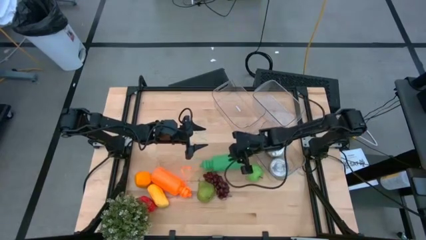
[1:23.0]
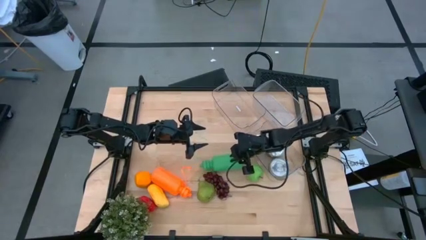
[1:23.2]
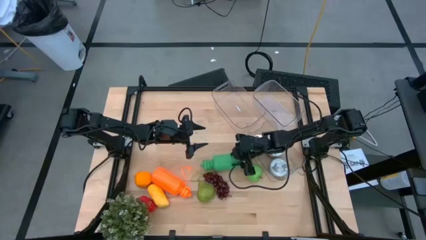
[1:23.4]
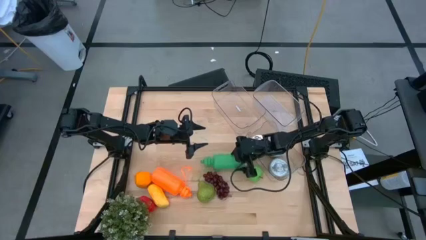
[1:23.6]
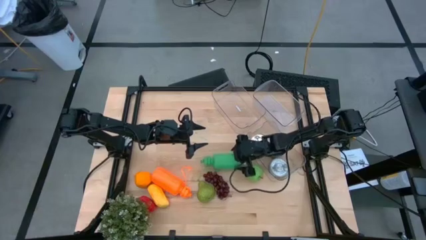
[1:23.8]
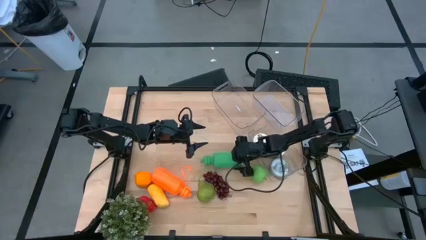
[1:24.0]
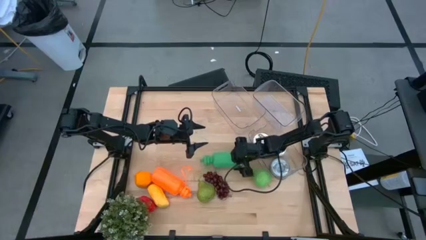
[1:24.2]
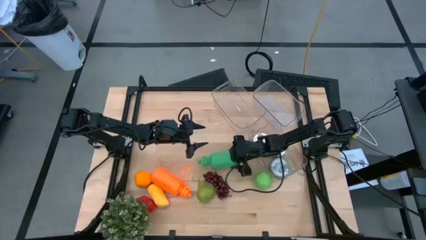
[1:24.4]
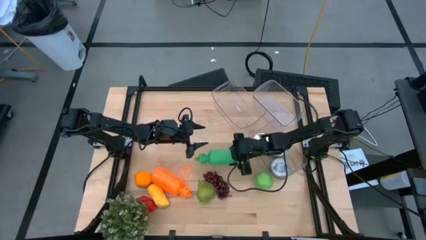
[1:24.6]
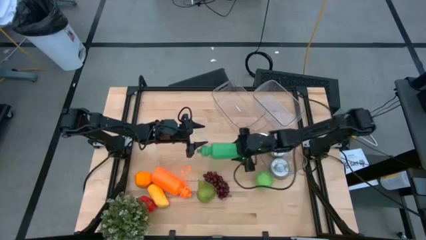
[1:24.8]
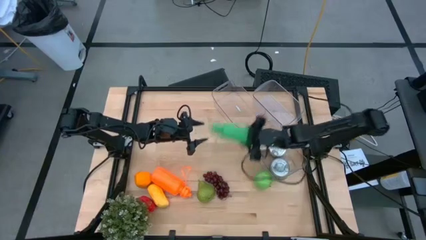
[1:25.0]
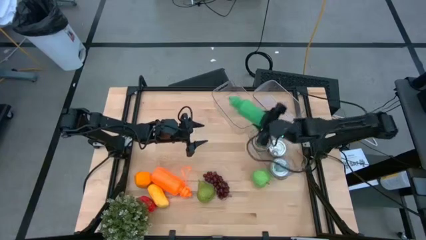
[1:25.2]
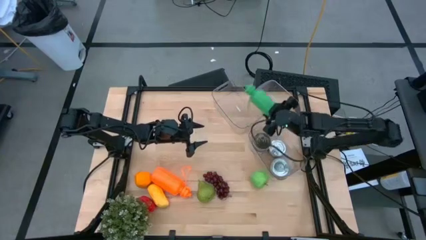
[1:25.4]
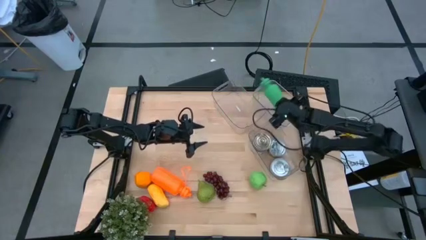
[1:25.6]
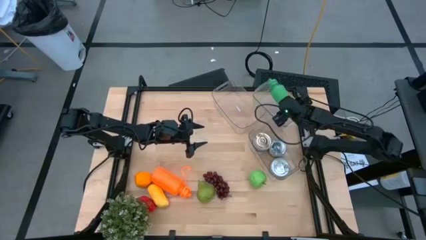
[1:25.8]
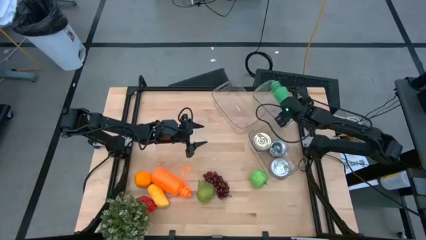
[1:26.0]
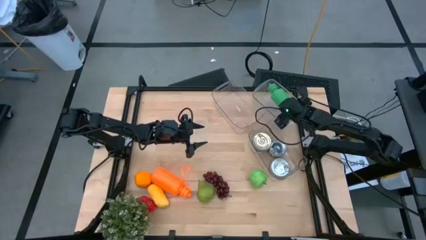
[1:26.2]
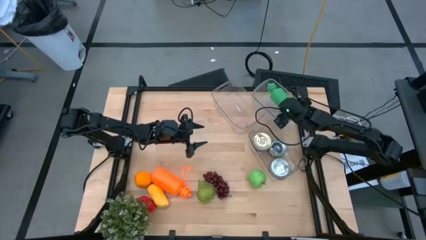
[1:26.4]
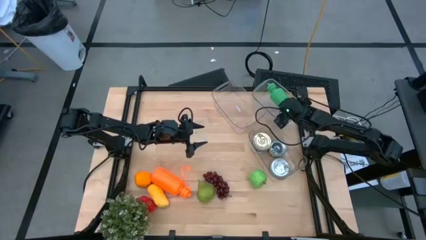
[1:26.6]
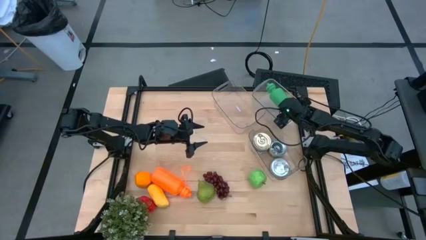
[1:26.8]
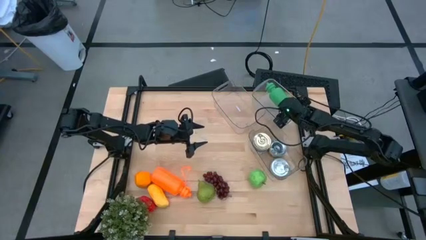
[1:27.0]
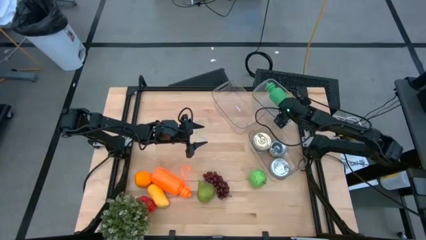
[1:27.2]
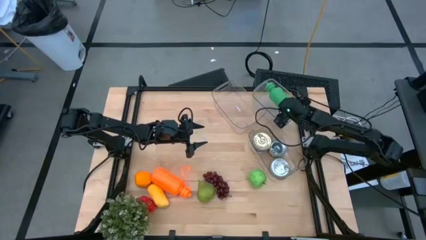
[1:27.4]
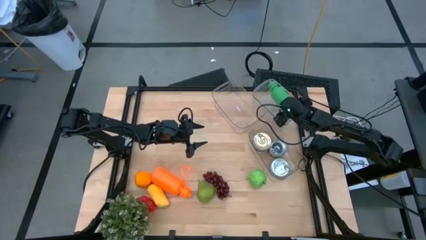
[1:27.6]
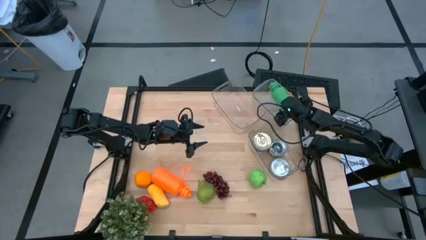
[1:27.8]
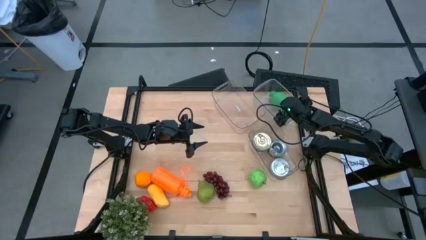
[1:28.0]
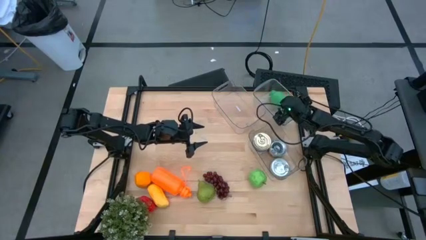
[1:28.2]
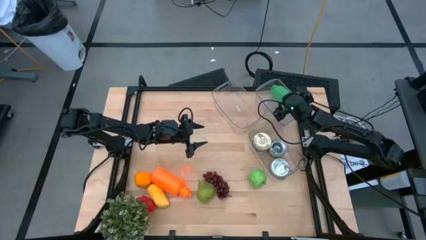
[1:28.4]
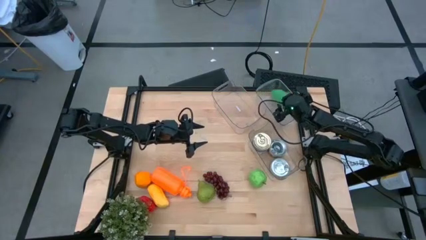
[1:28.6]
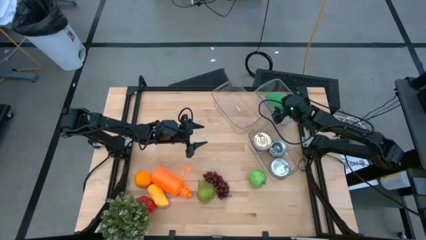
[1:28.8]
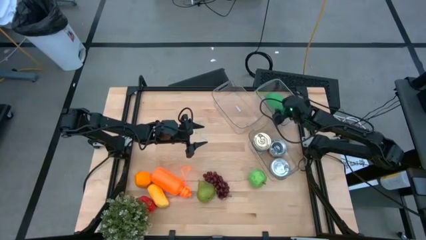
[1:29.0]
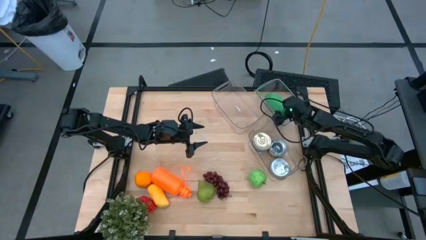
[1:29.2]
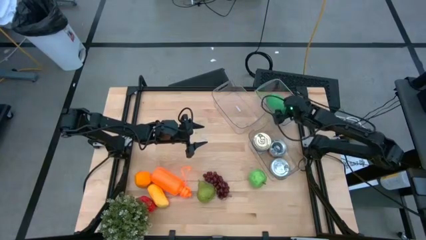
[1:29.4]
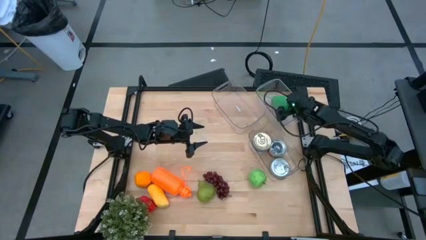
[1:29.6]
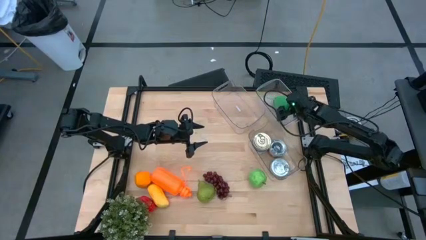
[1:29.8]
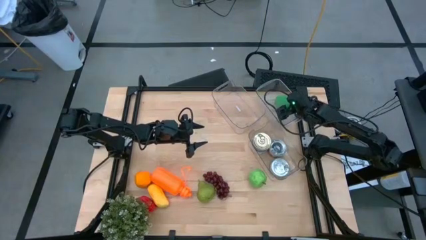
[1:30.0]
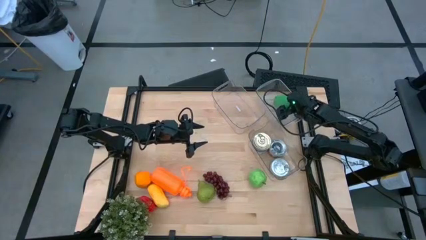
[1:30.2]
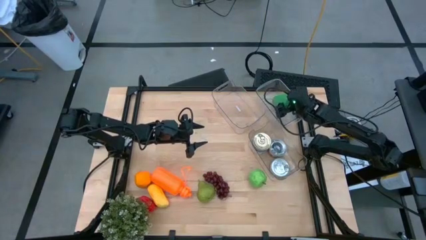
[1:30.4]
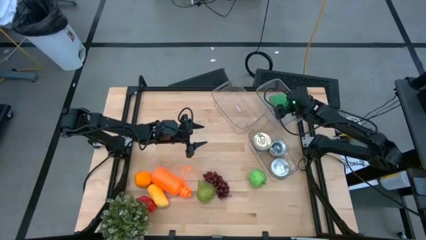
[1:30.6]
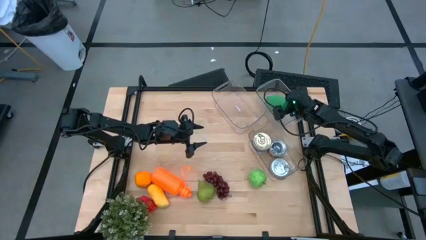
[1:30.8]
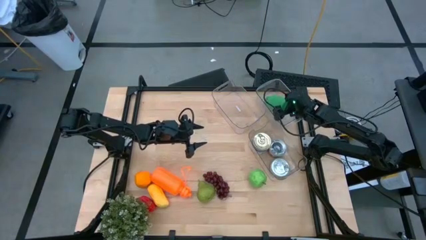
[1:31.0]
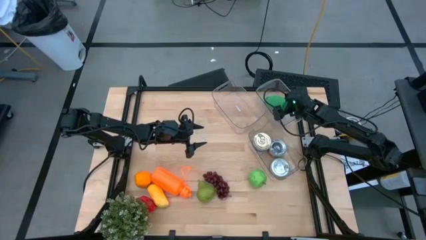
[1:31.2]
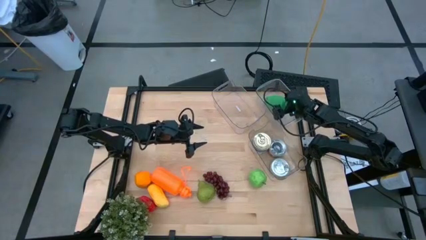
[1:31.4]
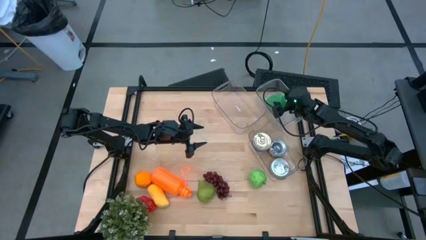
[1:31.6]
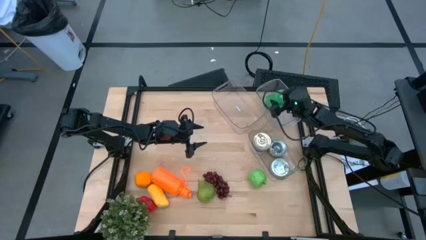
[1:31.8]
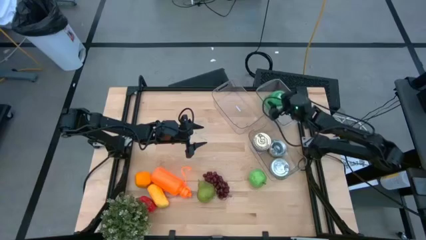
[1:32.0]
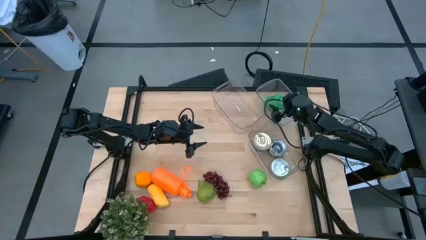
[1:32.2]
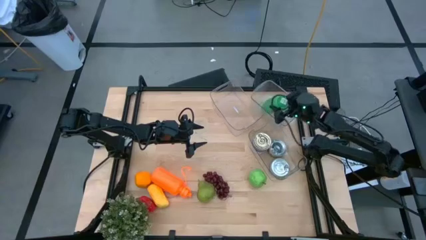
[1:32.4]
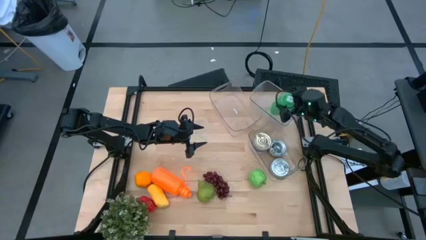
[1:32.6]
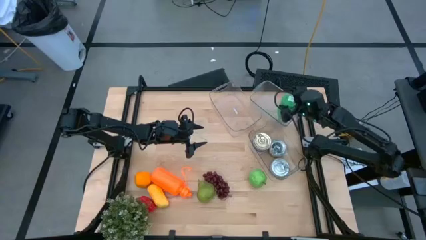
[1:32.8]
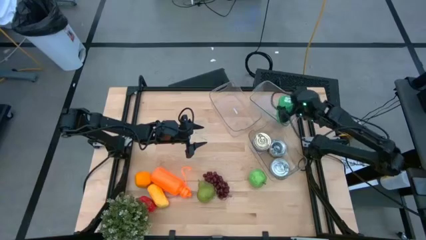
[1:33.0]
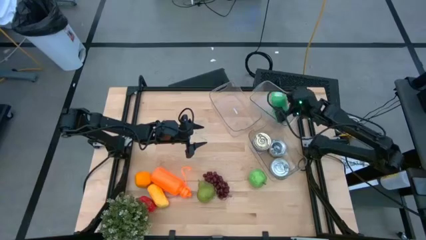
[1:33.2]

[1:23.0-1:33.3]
Task: Pick & Place Food Item
Put the green water bottle into the top right transparent bin

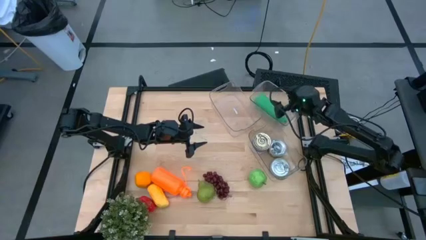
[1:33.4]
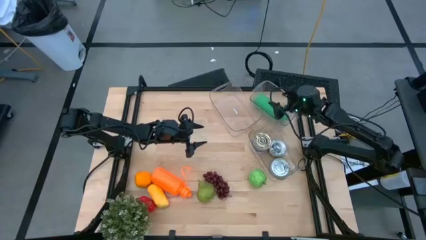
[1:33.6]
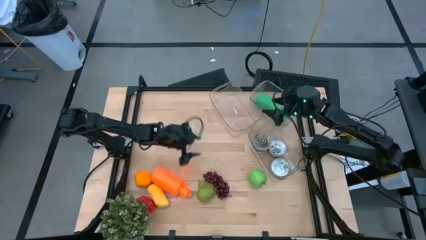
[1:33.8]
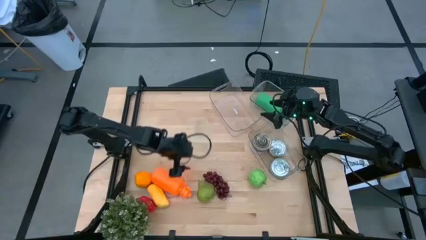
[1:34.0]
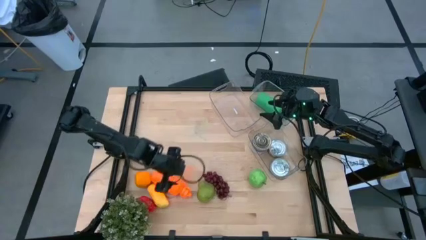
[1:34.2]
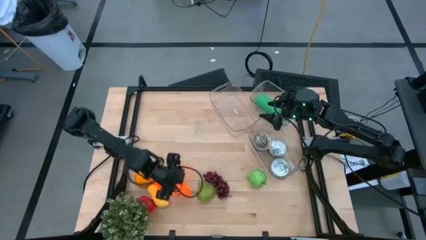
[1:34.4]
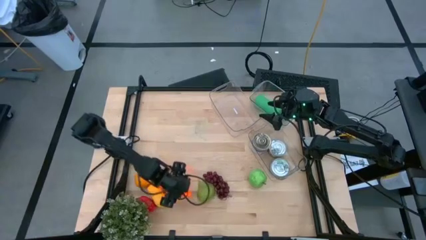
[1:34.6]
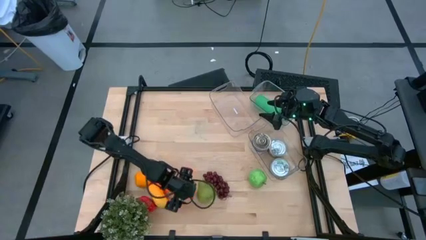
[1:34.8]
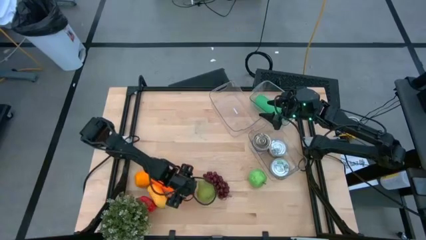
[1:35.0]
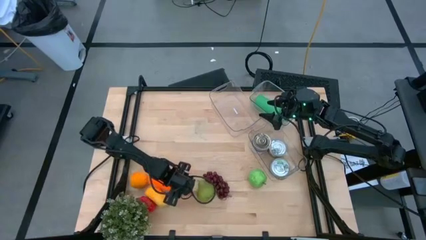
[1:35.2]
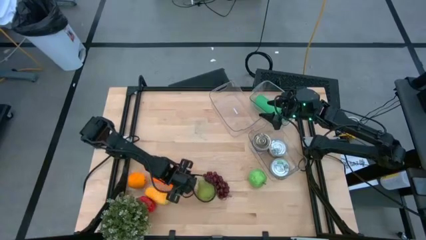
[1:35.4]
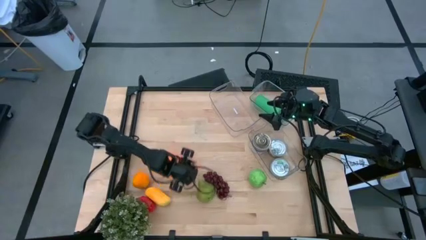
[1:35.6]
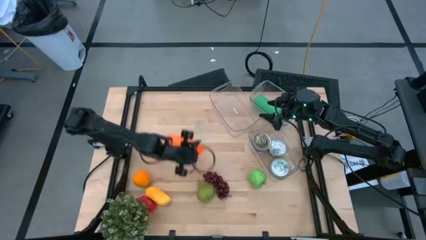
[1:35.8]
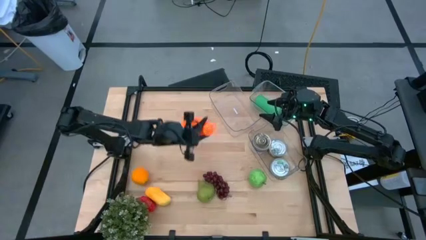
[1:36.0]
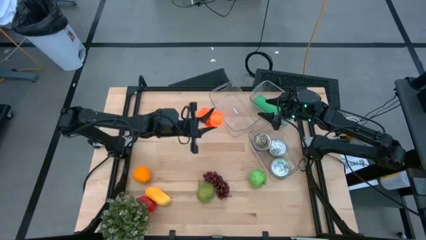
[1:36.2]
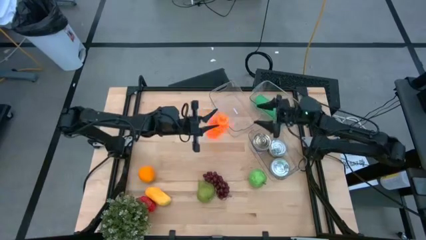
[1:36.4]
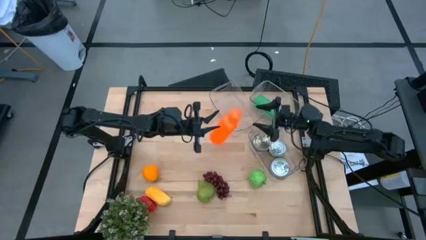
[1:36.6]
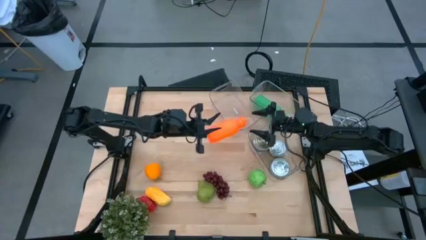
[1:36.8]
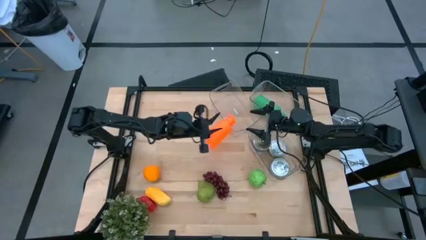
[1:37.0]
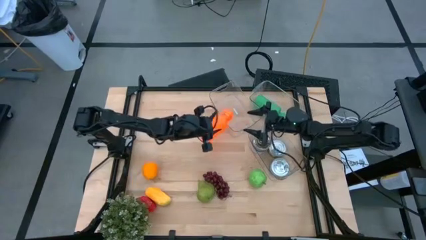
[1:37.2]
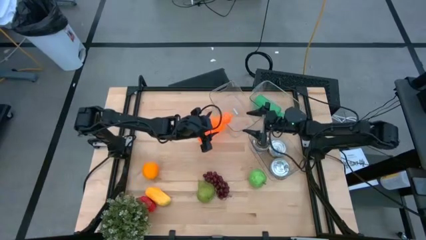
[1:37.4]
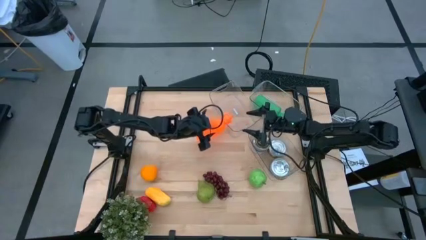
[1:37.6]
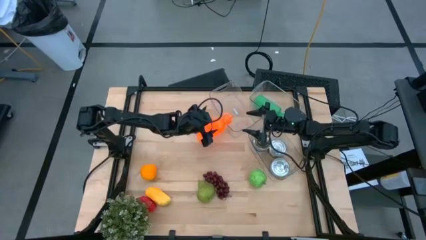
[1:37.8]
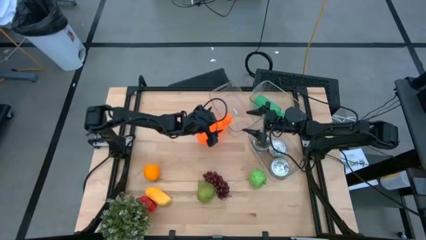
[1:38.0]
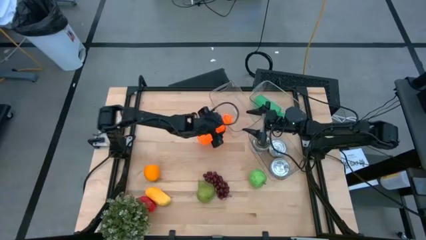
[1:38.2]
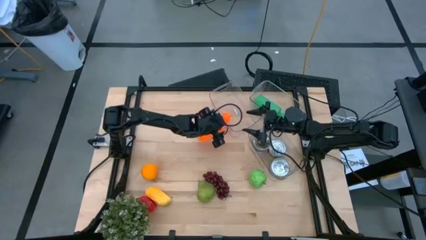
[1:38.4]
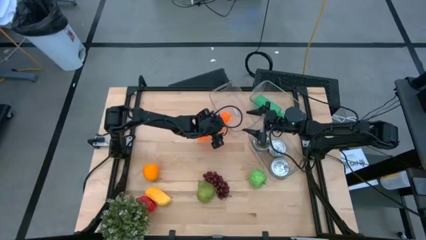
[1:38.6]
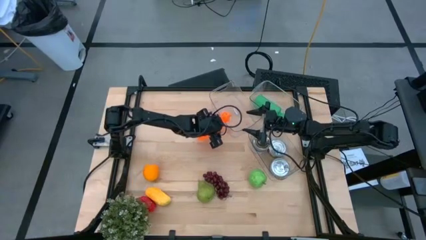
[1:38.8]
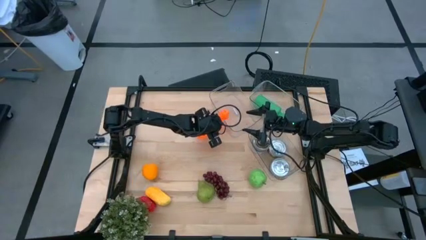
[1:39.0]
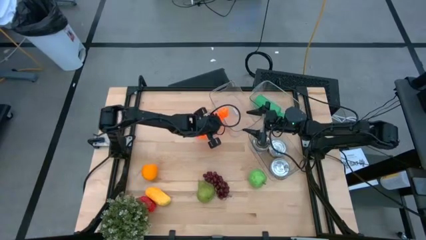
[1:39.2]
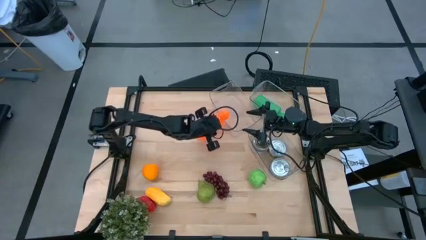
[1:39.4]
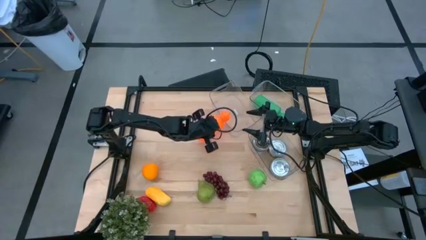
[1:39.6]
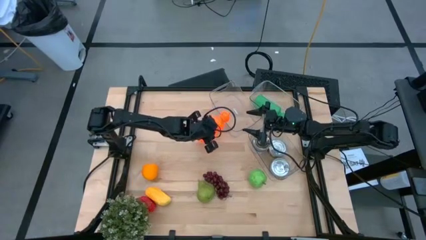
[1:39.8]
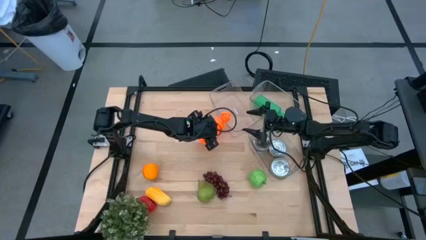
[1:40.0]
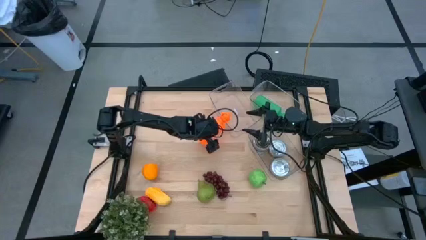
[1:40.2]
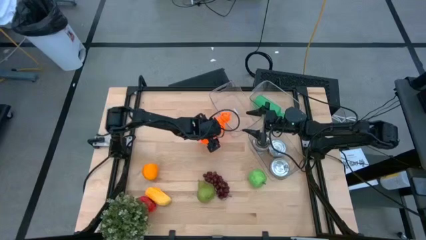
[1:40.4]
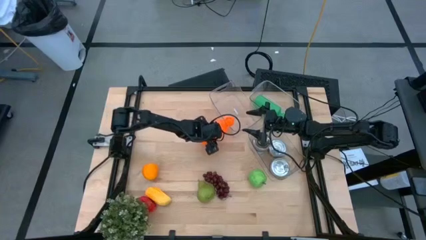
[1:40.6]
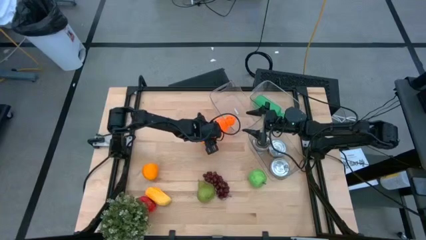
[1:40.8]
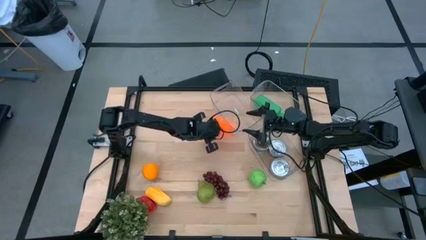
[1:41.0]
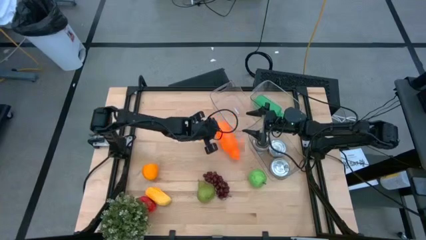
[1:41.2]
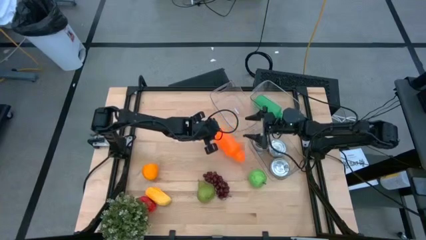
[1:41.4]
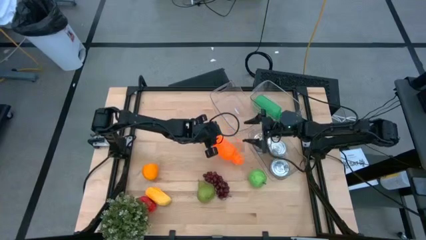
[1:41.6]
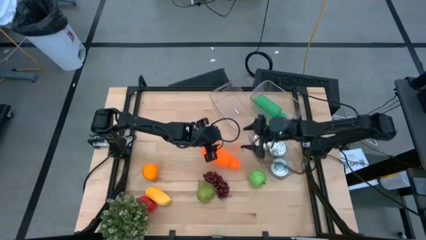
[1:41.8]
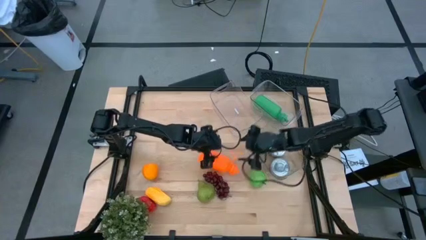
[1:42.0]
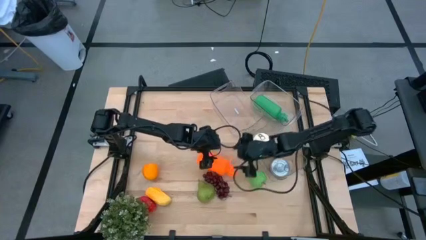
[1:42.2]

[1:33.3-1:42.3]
Put the orange water bottle into the top right transparent bin
